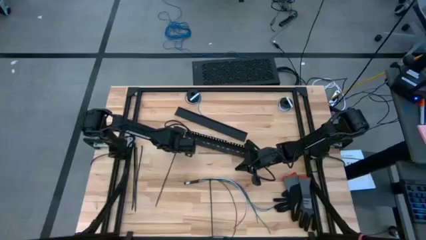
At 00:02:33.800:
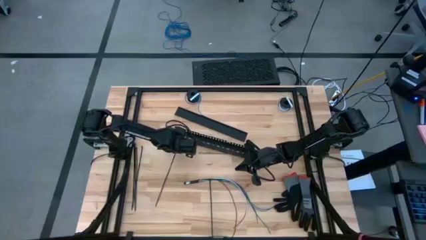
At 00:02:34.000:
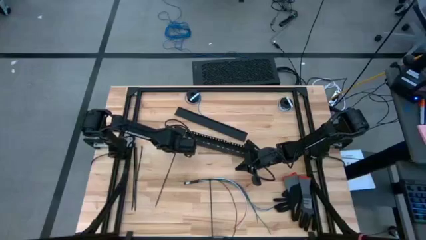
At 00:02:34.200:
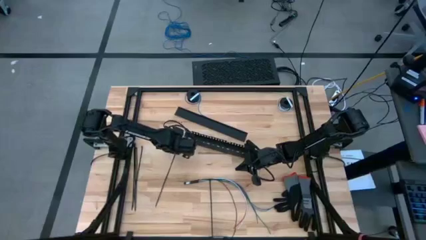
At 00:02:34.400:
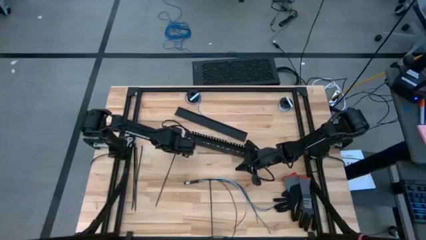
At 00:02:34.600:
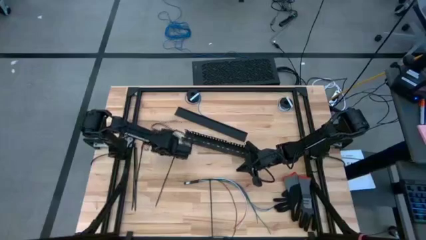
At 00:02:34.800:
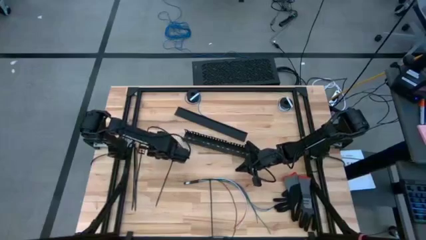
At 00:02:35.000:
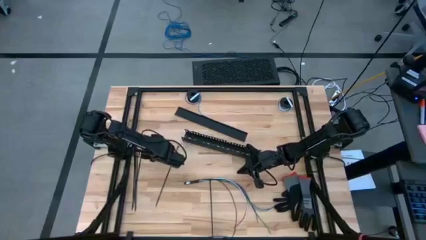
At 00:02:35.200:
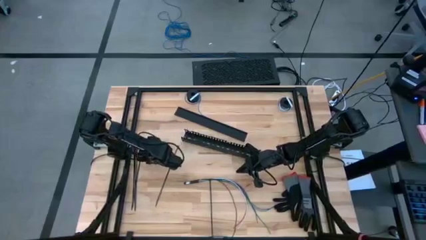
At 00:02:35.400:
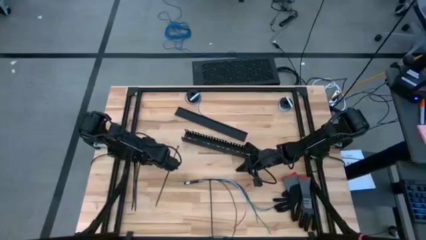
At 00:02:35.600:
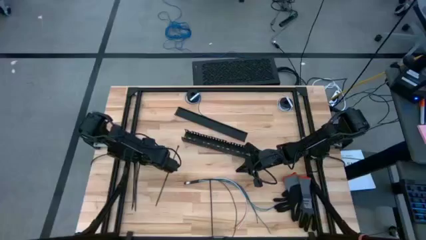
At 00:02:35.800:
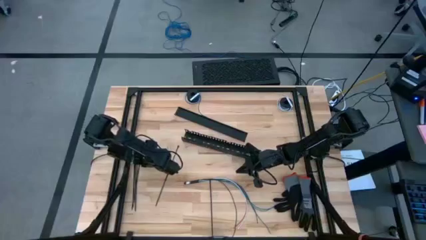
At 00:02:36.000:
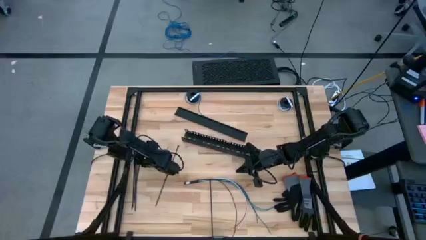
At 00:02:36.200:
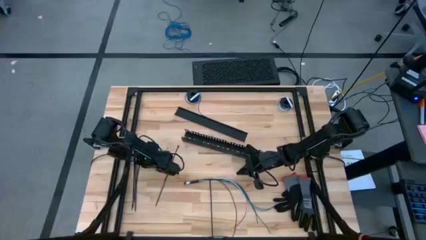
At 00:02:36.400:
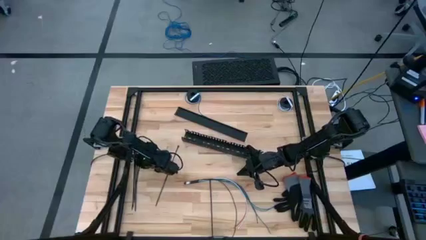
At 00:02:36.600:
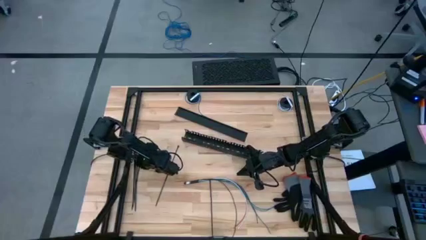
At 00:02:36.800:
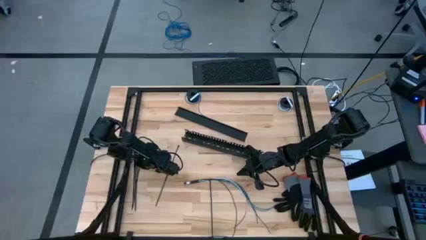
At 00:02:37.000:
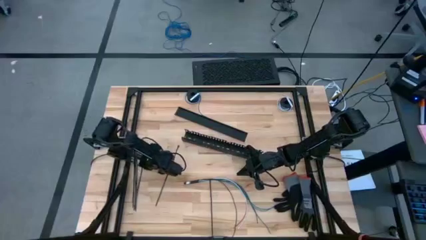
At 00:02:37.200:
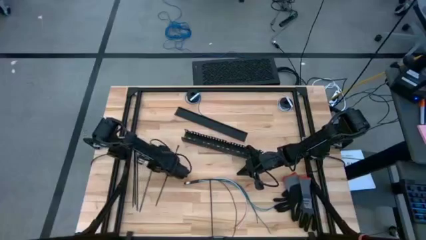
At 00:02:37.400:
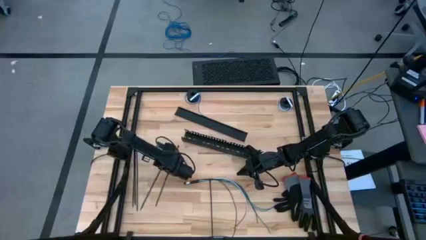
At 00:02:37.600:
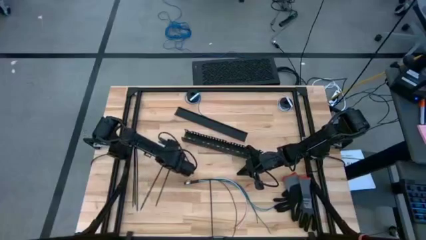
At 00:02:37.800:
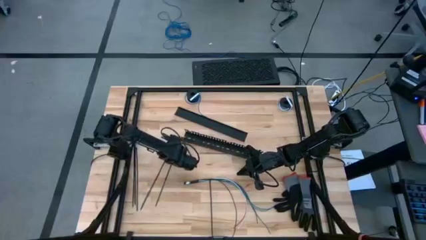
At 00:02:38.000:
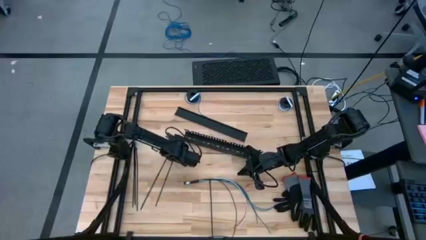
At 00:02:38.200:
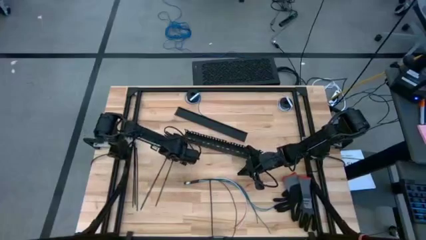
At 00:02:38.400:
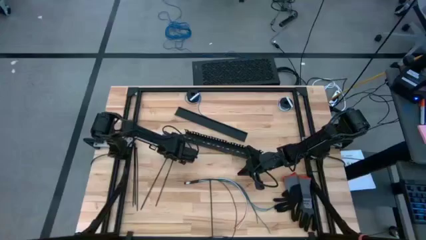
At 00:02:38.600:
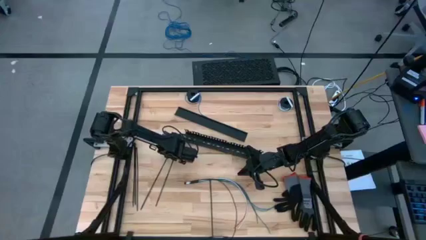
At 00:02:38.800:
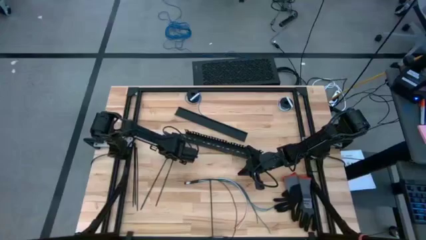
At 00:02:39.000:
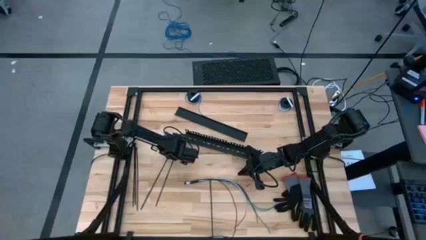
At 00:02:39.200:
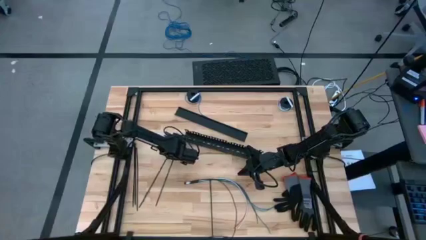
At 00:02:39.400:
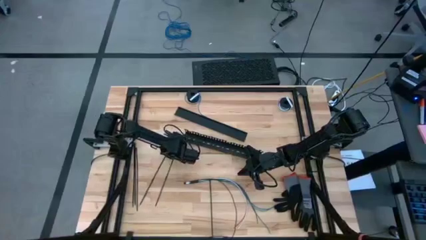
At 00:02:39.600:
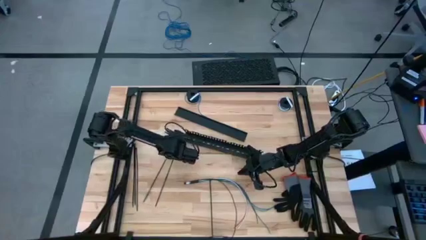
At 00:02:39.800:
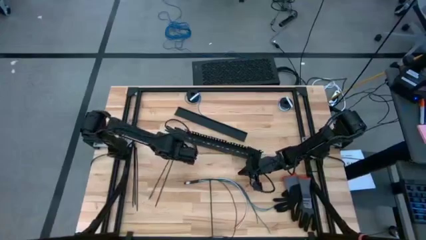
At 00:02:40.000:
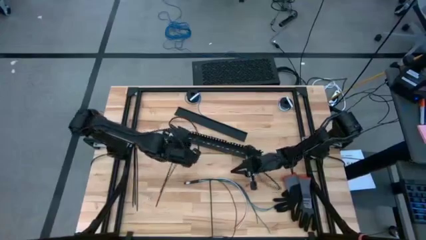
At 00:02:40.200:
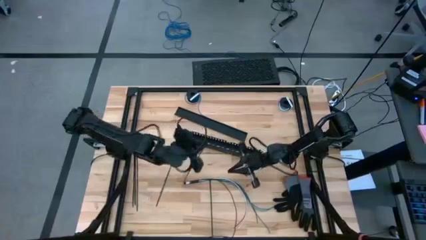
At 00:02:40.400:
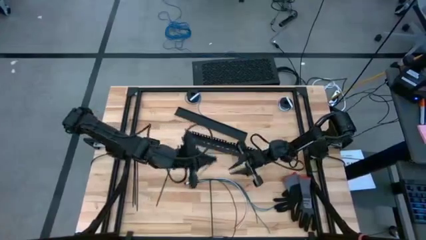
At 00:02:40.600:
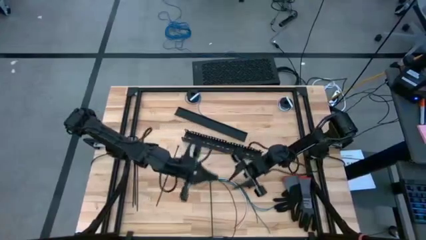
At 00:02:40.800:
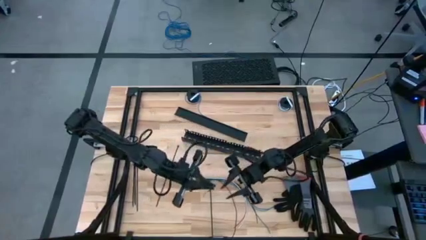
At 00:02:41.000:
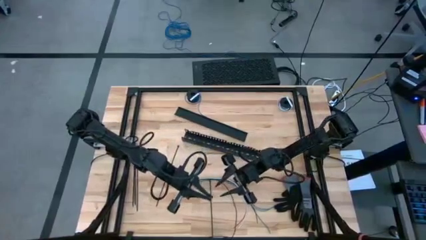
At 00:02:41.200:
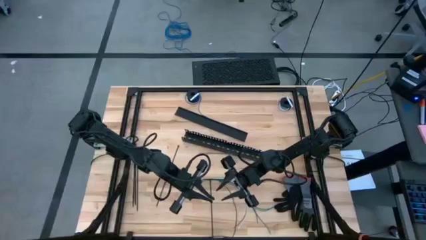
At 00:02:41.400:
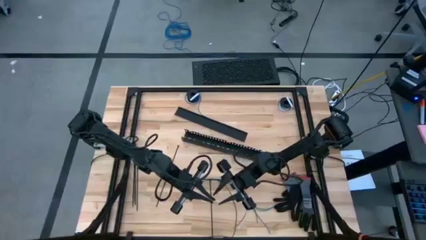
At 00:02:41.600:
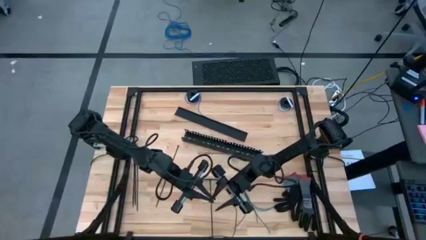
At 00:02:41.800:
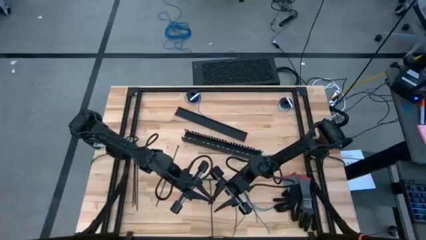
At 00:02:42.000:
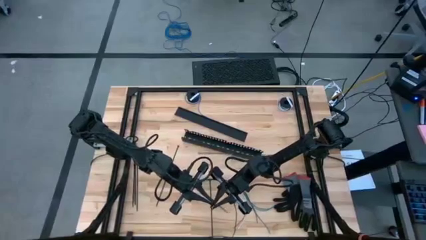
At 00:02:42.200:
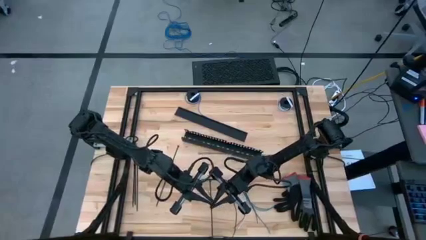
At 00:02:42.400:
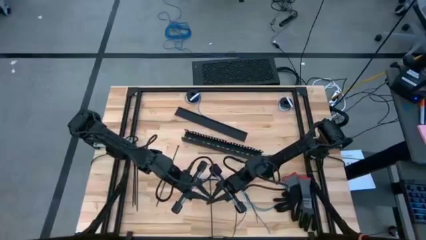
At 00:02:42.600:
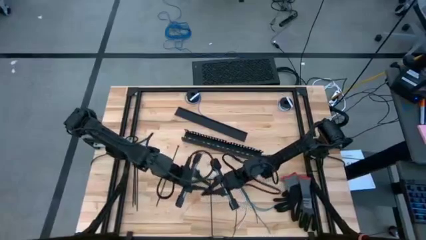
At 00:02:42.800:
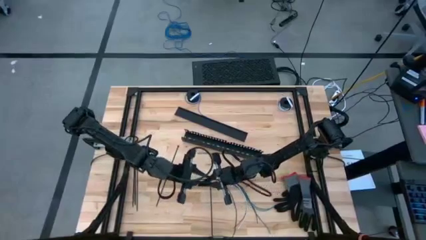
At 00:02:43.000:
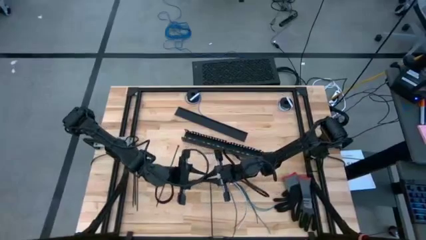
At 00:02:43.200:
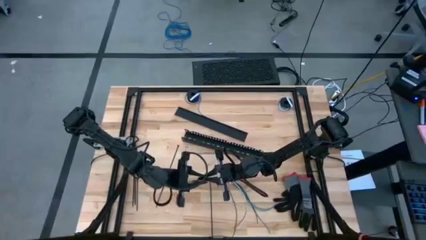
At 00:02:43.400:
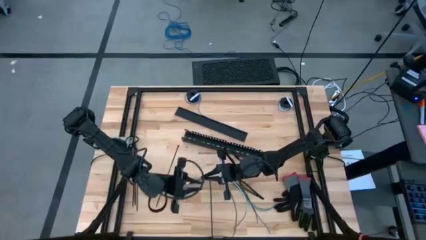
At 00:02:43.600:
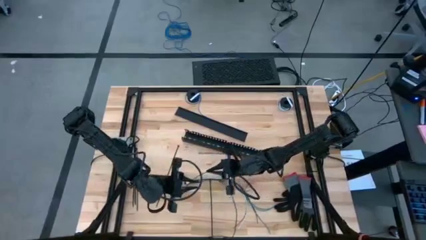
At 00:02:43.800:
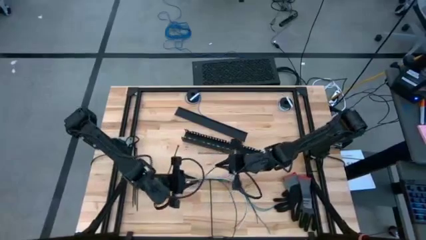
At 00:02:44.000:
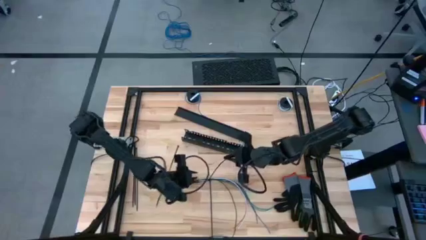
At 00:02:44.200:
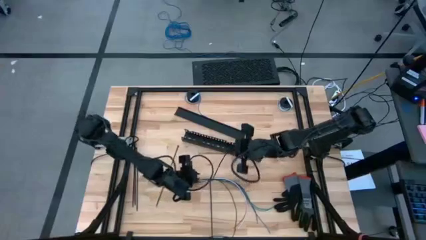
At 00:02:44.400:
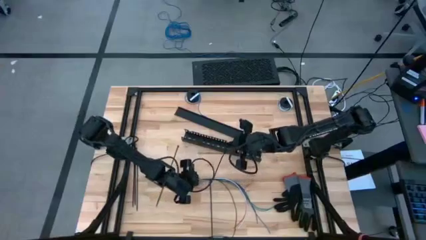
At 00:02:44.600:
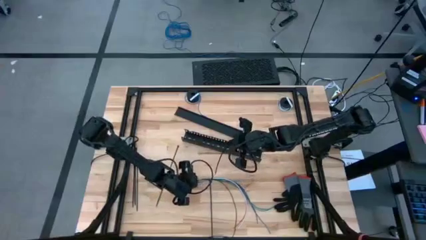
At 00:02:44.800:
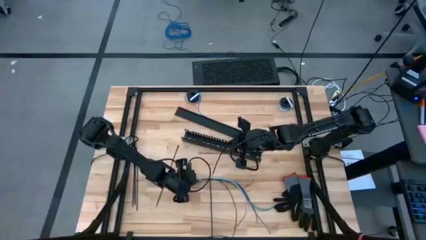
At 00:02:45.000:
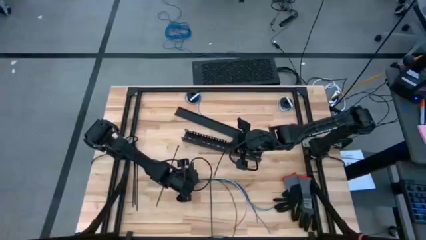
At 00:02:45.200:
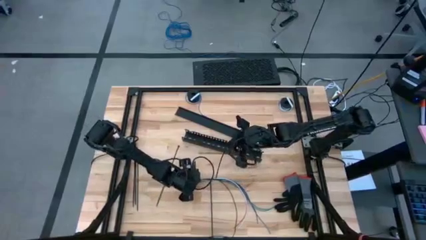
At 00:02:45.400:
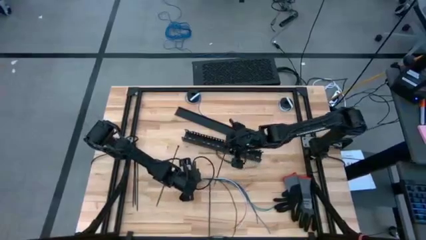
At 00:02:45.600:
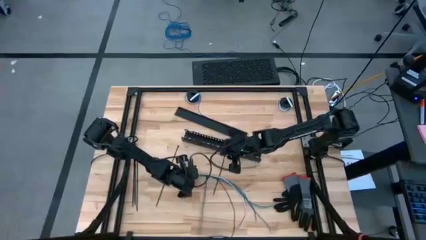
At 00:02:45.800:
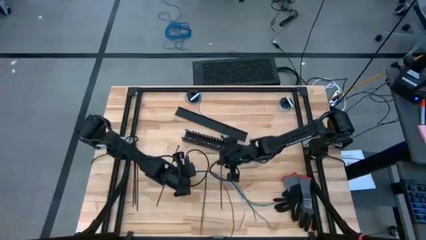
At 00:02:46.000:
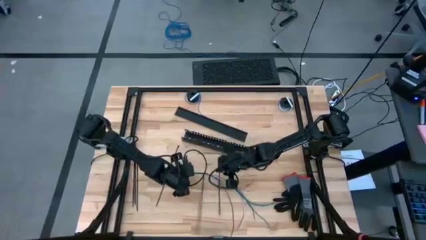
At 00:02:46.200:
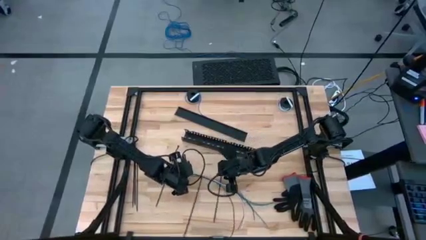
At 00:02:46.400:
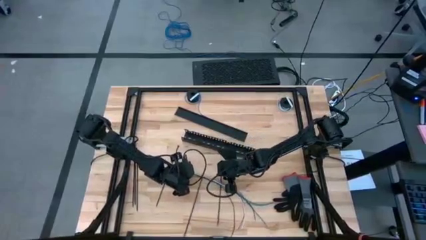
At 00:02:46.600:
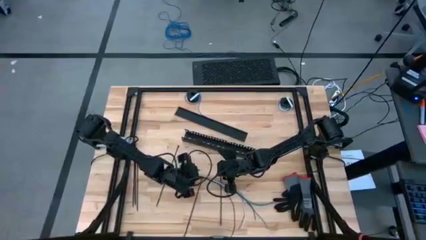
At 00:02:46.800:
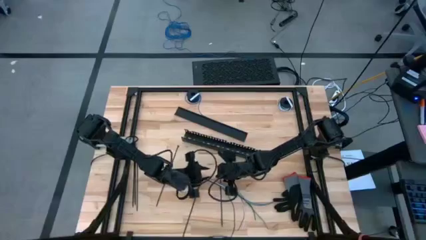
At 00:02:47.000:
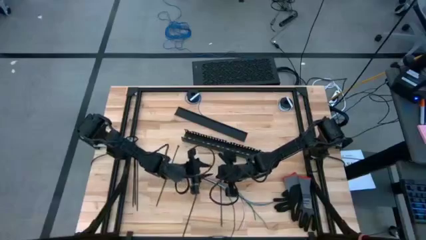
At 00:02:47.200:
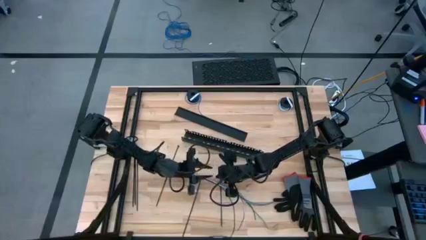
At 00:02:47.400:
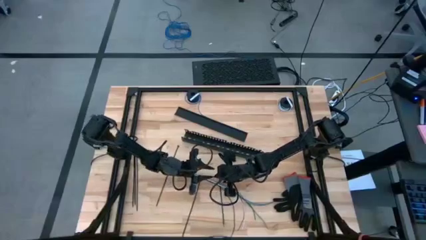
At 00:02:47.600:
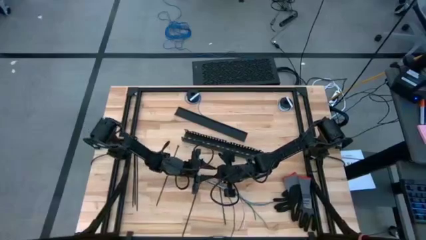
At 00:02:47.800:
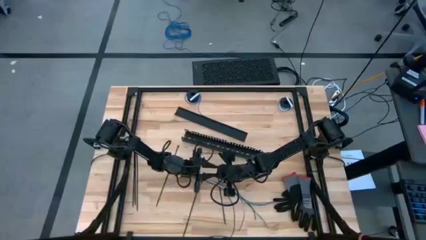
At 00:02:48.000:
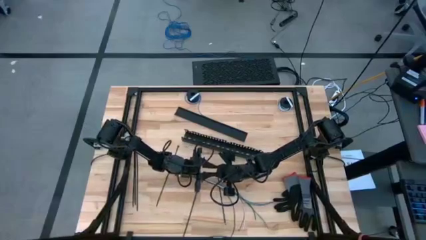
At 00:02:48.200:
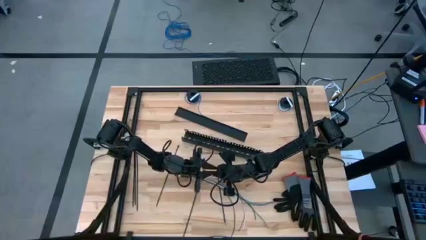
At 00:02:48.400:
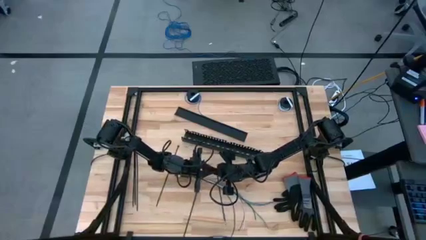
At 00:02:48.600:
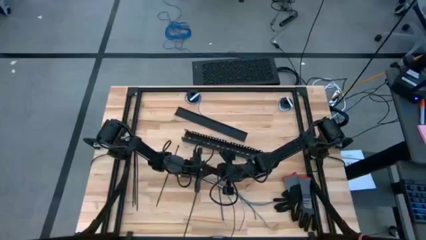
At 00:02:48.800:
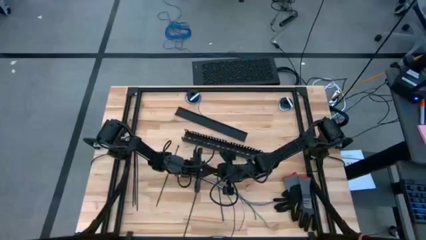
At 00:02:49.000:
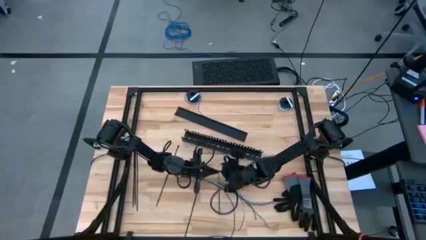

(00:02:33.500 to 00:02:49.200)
Task: Ziptie cables
Wrap the cable wires with the black zip tie
